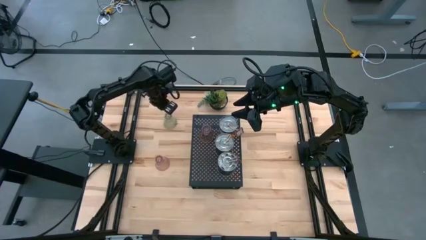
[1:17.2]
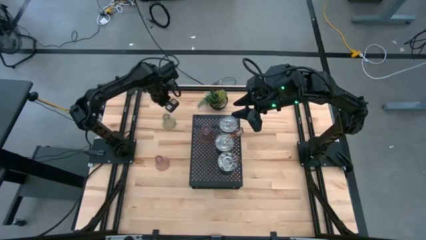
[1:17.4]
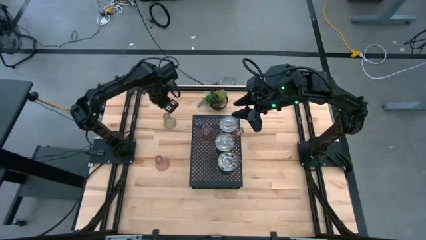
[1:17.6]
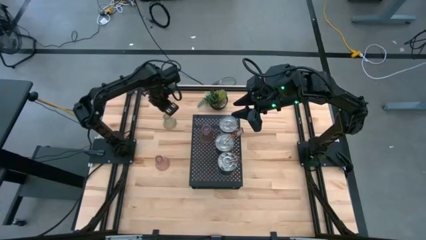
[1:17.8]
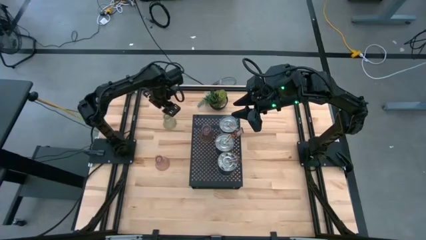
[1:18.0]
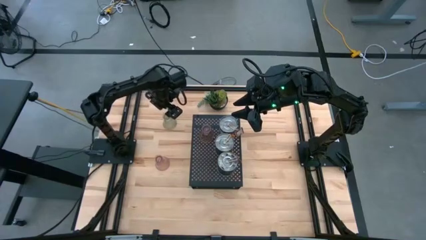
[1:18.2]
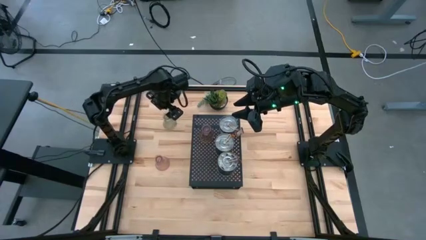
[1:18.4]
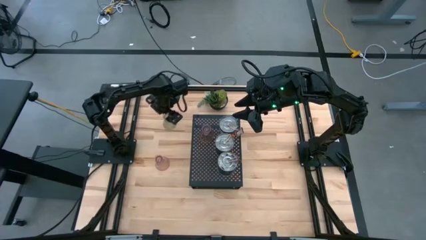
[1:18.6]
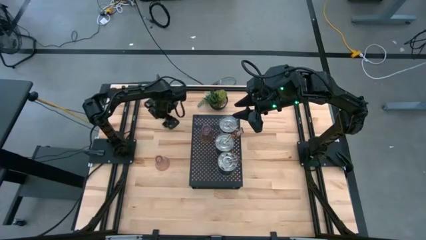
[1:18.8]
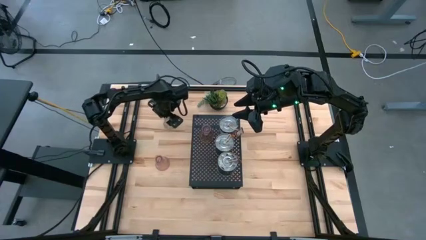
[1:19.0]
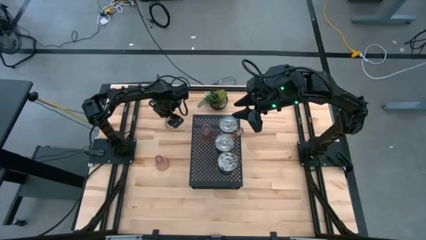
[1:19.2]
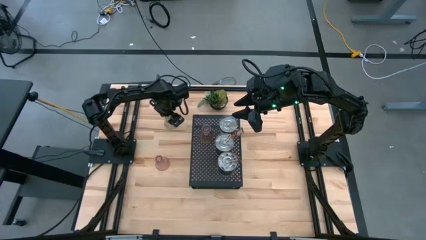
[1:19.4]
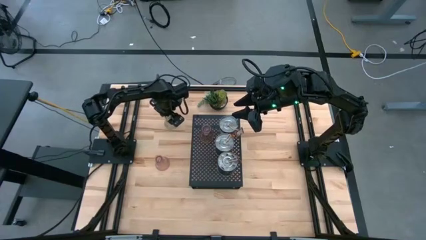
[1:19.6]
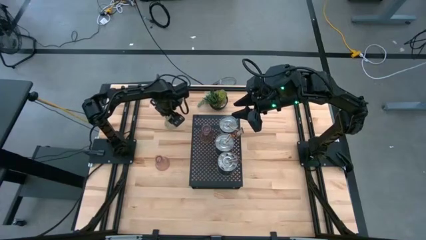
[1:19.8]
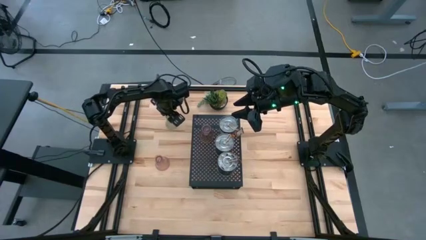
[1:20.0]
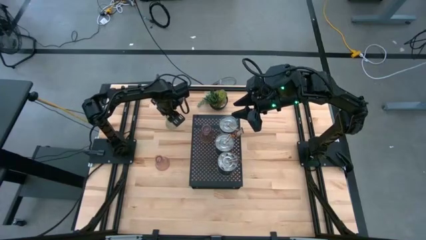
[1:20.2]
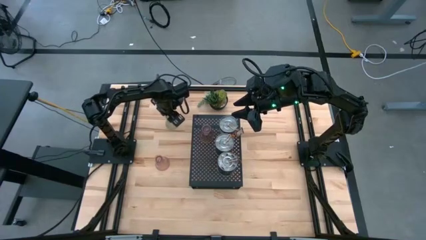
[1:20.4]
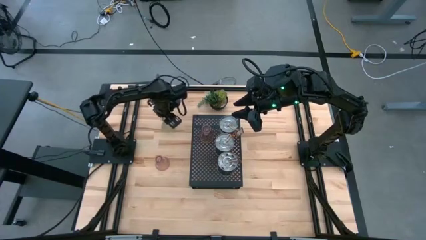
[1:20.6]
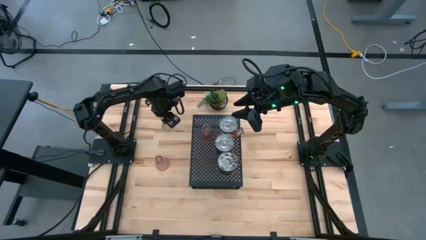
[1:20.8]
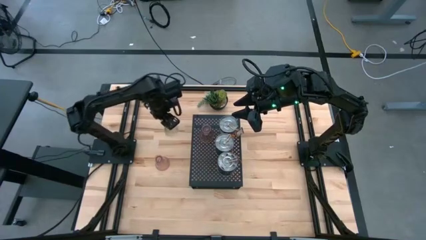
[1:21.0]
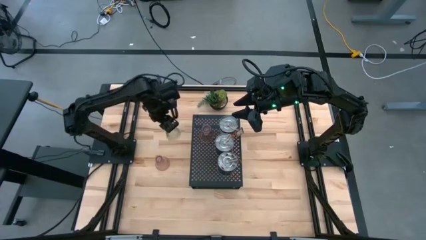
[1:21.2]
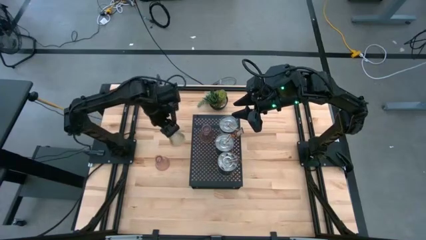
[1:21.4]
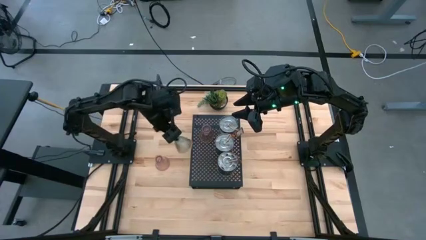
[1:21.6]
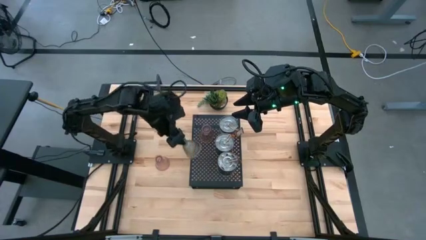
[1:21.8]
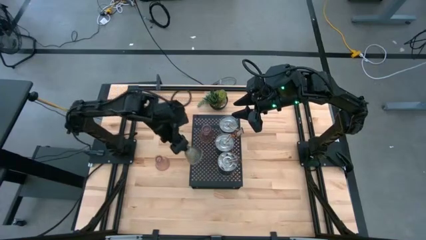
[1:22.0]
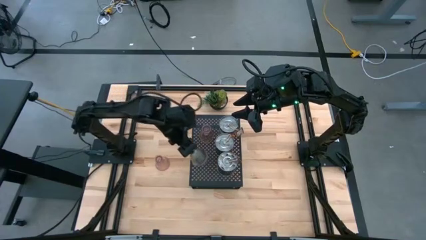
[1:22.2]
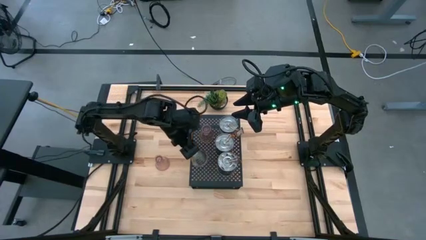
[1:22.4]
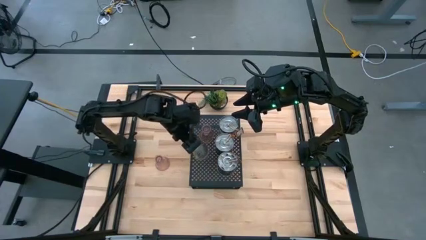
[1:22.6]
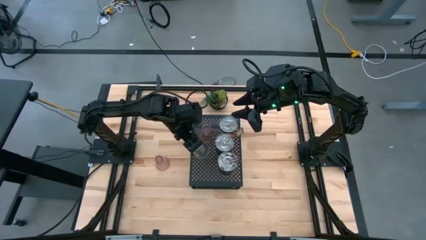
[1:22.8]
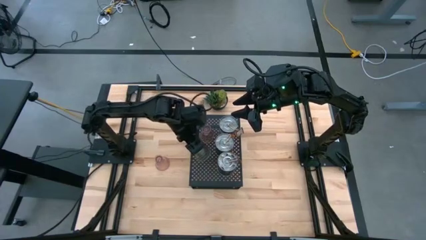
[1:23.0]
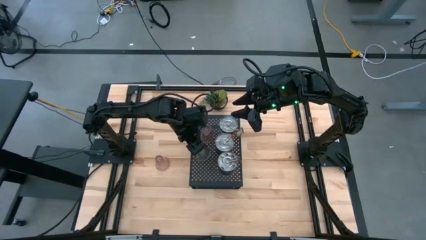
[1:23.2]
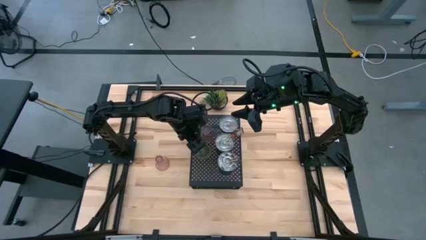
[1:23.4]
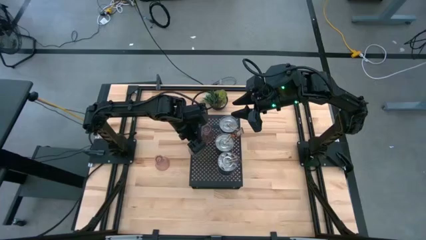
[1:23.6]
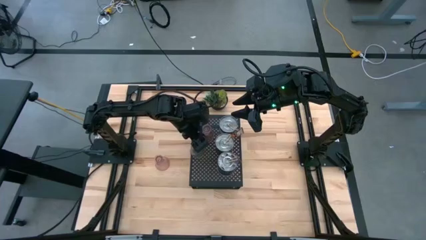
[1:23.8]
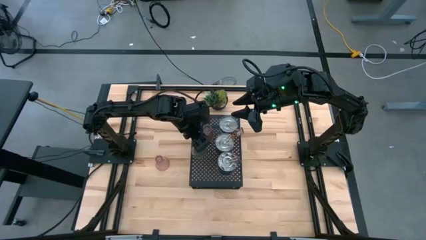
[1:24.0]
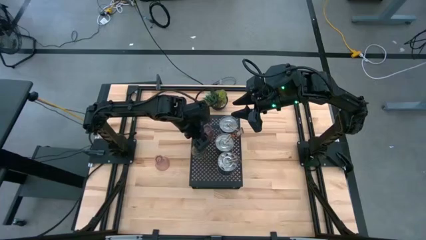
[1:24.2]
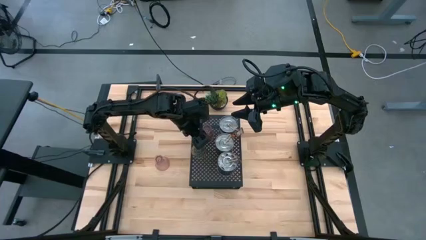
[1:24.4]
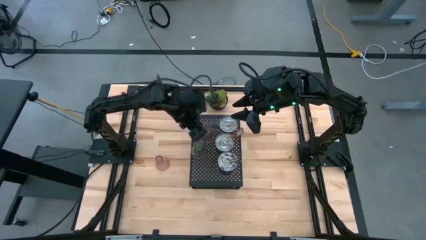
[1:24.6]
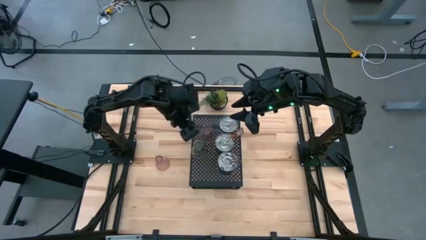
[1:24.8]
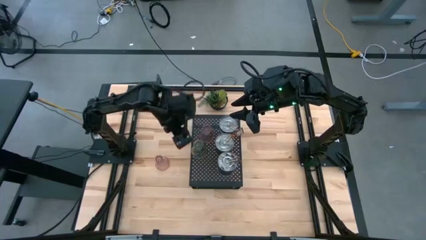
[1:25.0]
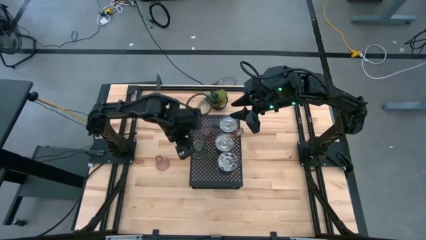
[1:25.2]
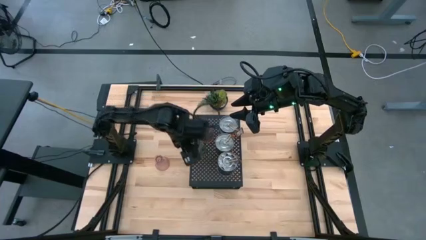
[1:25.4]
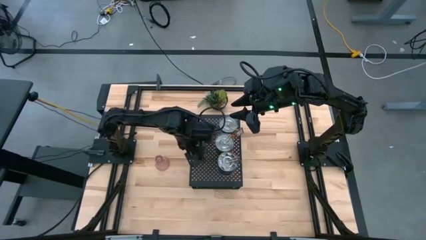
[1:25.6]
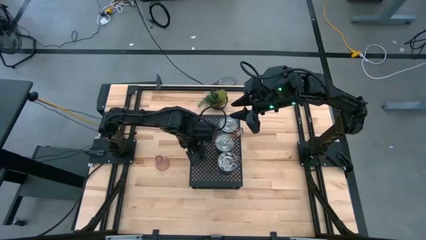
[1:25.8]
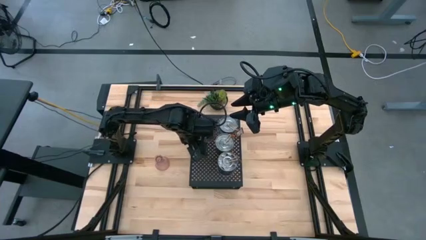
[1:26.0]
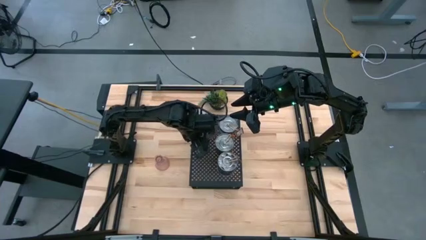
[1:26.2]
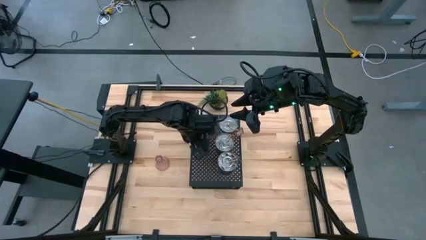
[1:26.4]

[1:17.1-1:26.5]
Task: Pick & Place candle stick holders
Put the green glass candle holder on the shelf aligned with the other glass candle holder

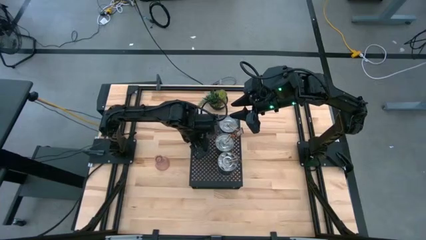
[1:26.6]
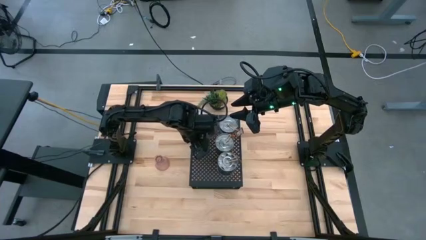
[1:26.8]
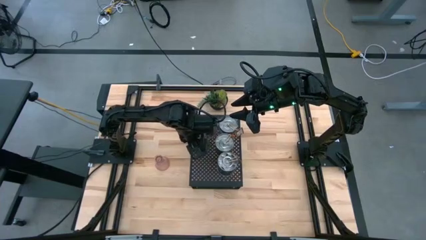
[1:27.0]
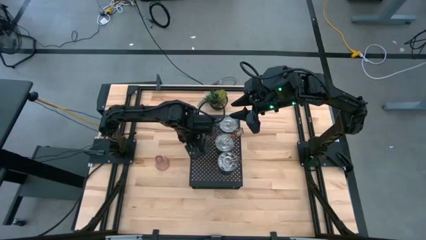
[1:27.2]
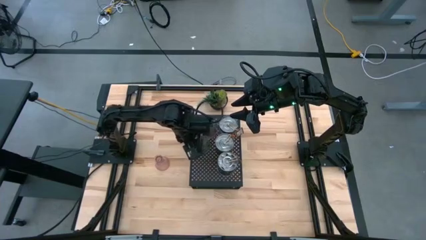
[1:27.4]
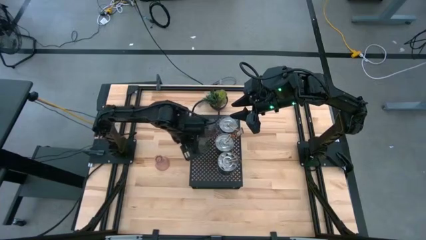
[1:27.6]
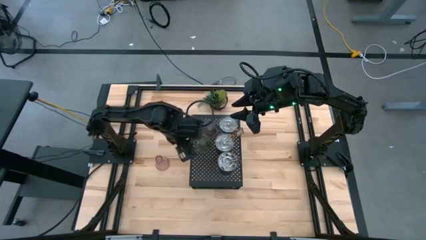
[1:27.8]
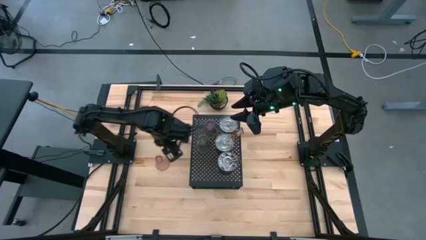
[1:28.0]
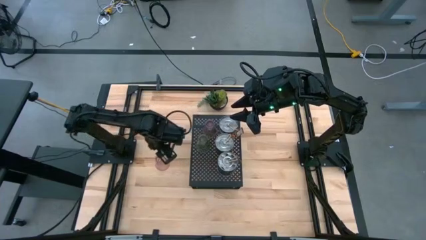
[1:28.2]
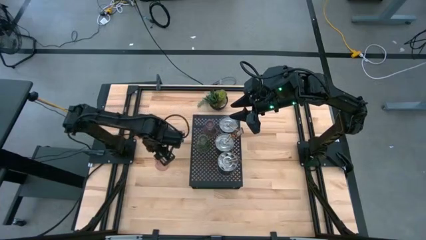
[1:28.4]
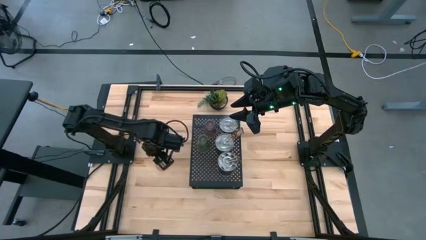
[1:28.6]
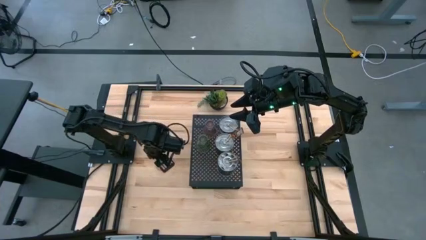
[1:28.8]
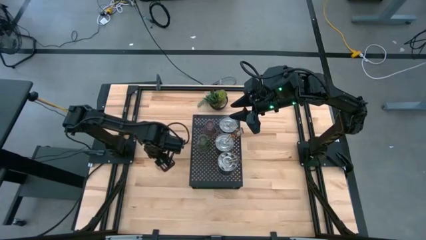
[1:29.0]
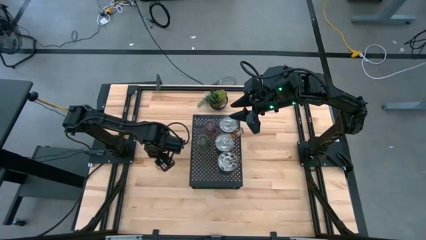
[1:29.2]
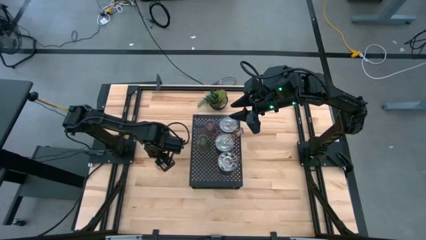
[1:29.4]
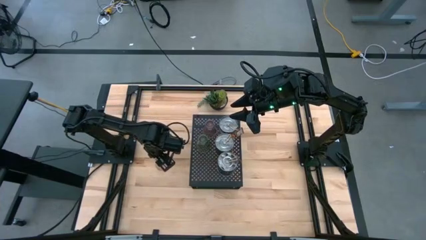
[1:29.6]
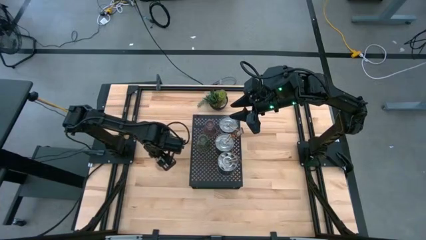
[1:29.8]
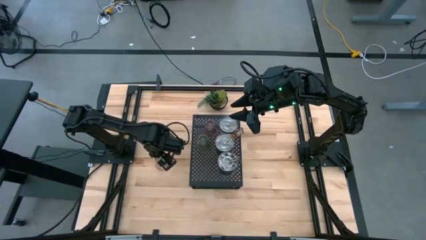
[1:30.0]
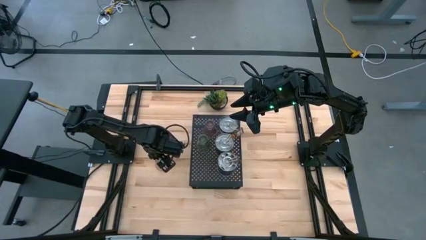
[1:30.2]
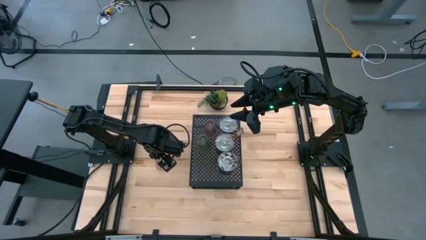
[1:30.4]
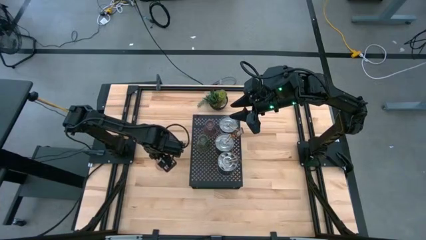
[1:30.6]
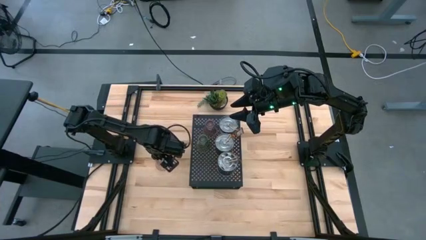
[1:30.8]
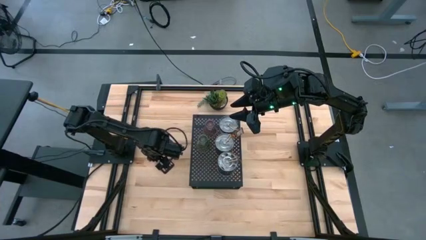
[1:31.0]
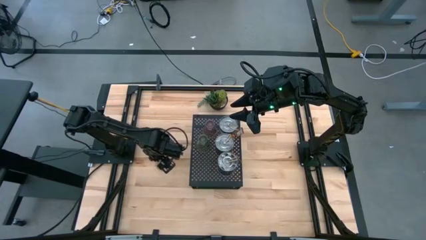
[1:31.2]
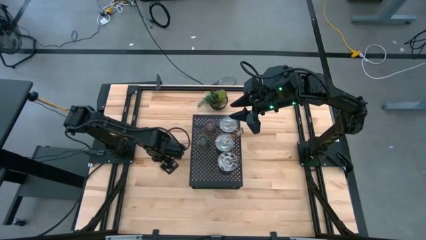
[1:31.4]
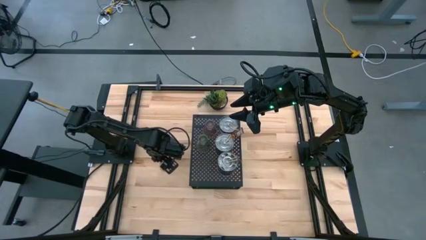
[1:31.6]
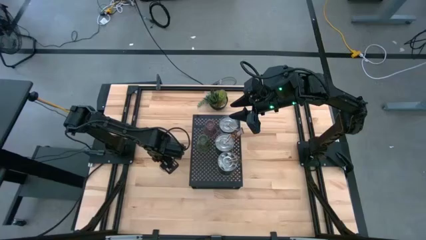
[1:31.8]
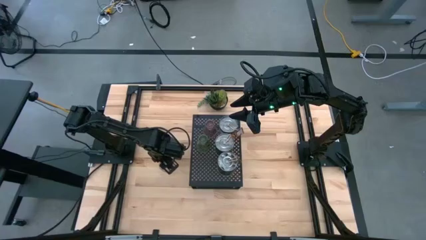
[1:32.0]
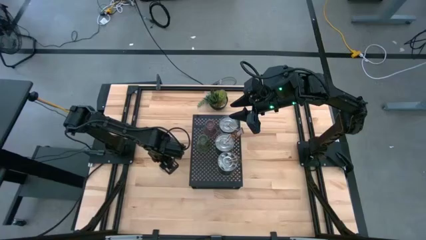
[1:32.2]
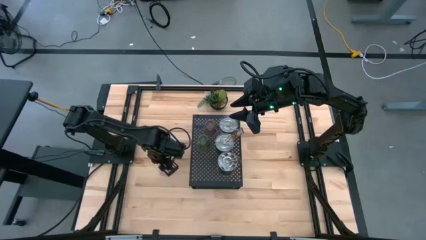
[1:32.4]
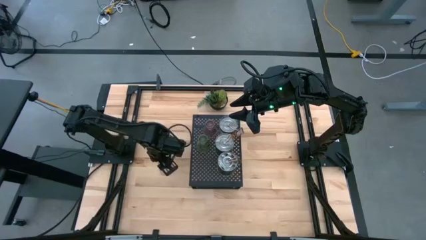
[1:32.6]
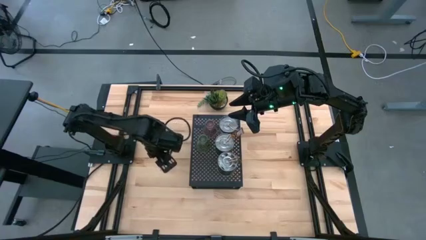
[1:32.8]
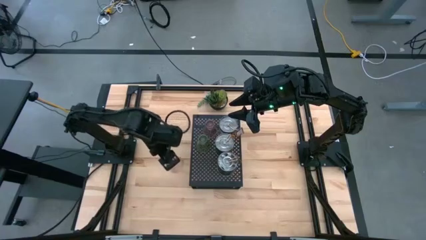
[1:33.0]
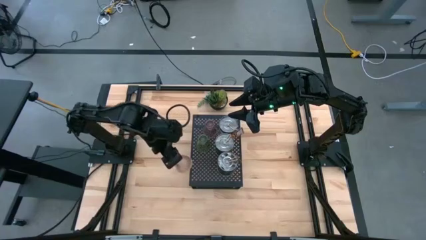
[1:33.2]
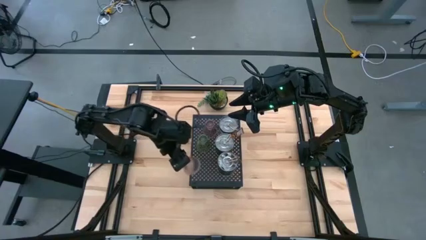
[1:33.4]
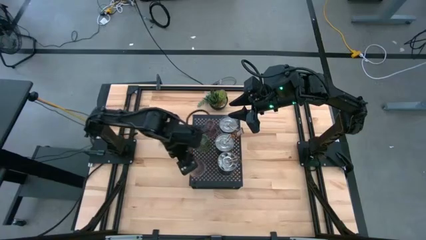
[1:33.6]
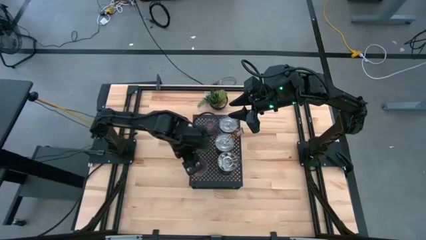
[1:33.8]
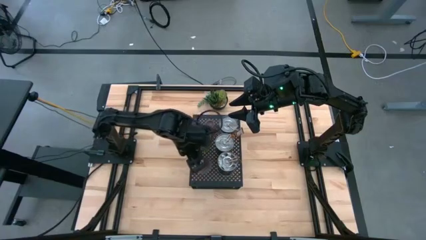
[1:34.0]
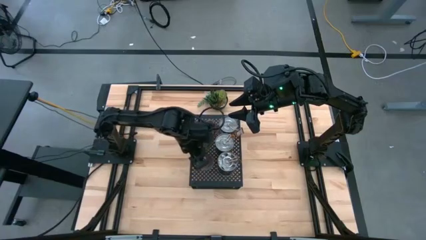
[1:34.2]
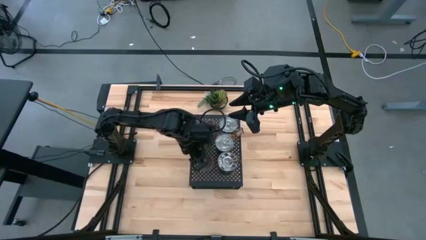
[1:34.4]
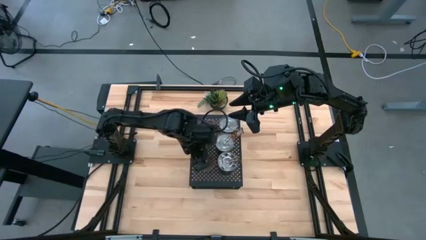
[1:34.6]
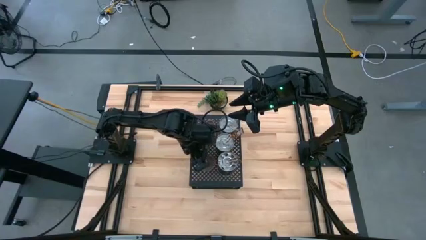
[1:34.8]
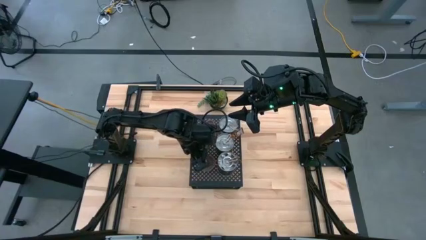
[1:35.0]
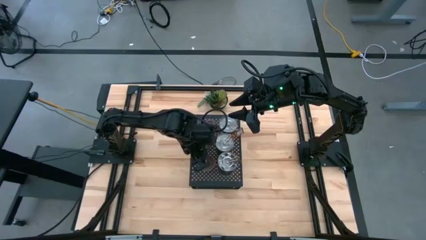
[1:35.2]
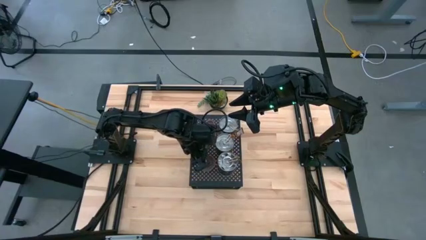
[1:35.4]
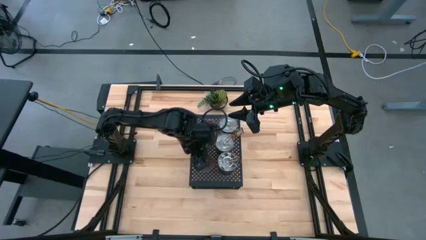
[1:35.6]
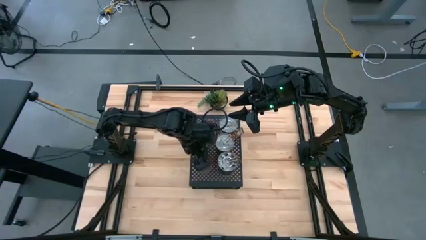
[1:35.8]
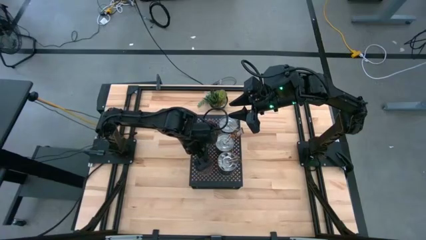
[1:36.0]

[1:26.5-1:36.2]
Put the pink glass candle holder on the shelf aligned with the other glass candle holders
